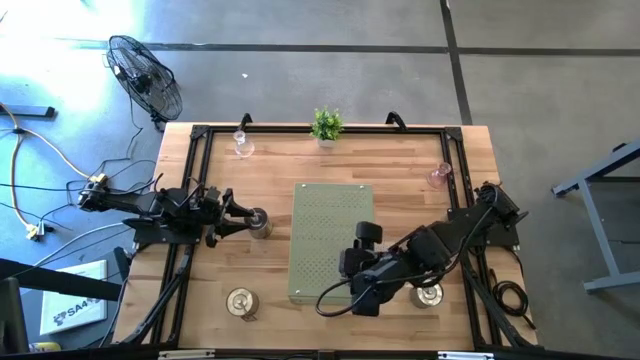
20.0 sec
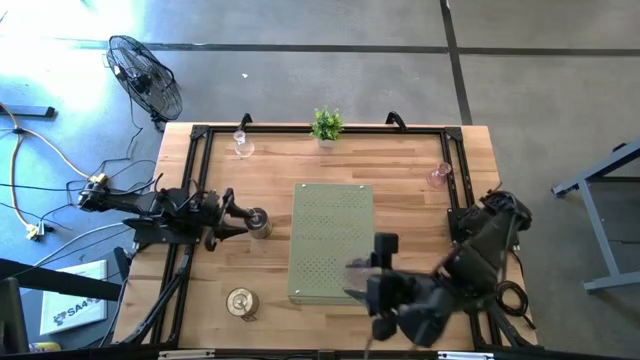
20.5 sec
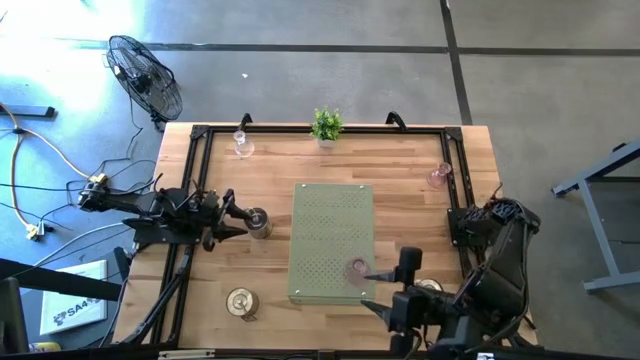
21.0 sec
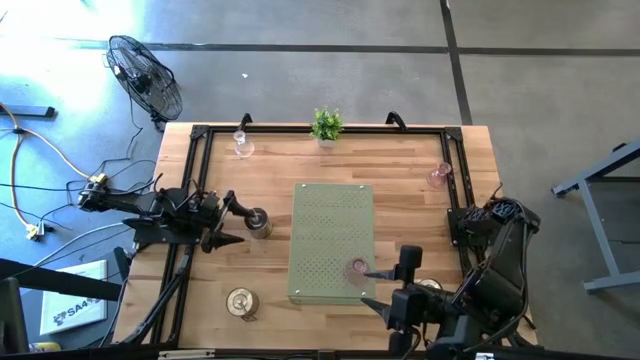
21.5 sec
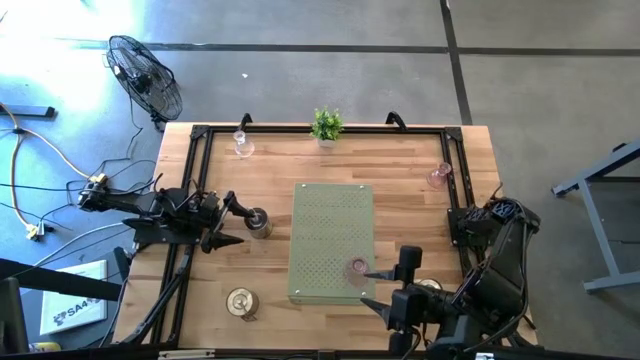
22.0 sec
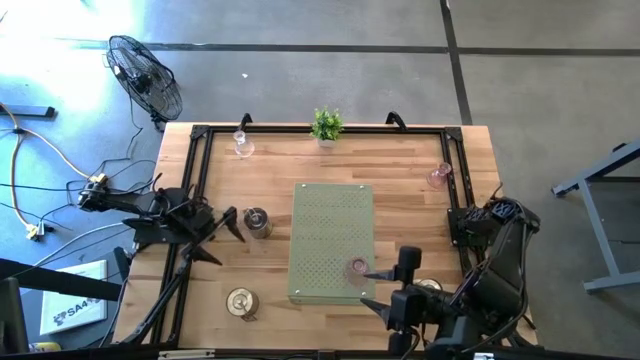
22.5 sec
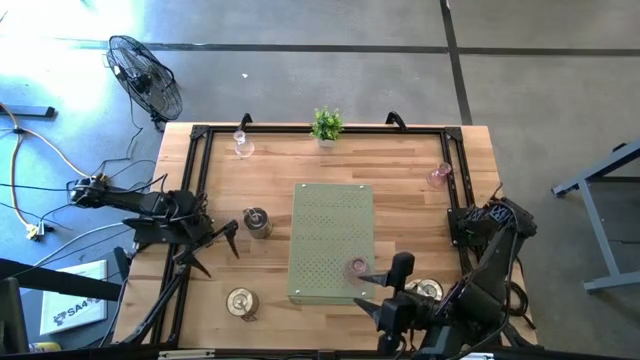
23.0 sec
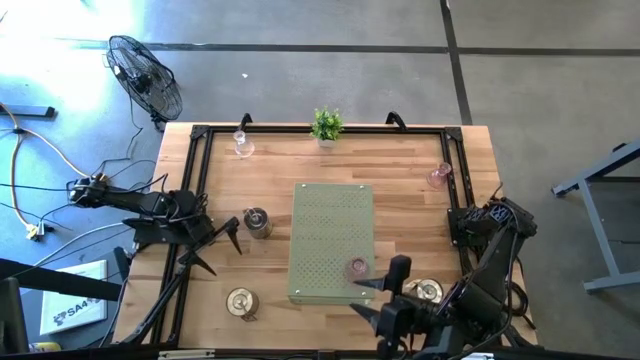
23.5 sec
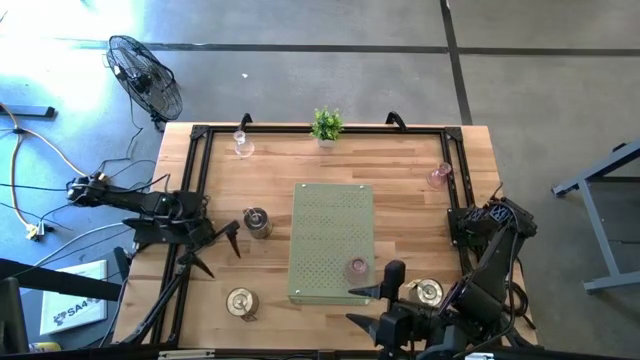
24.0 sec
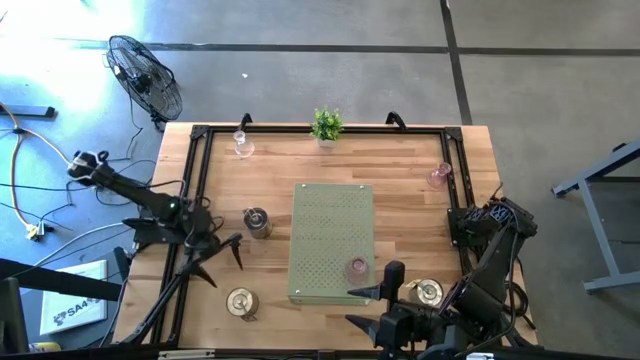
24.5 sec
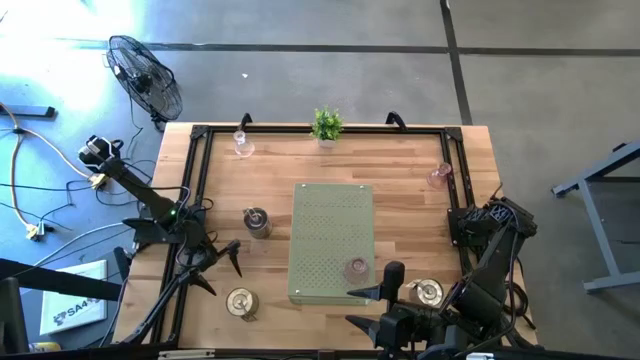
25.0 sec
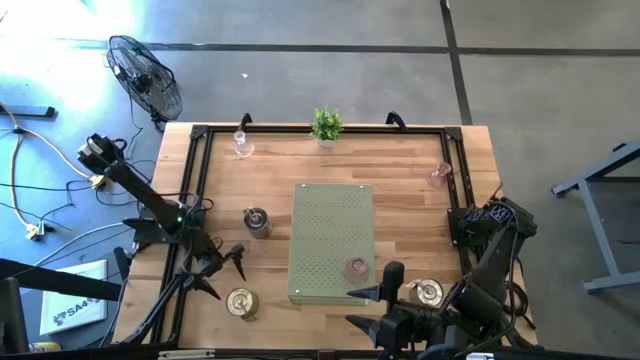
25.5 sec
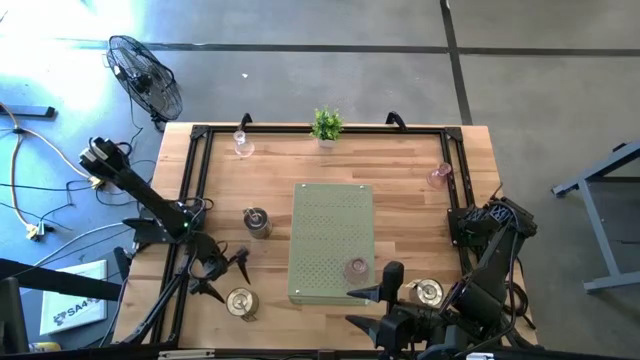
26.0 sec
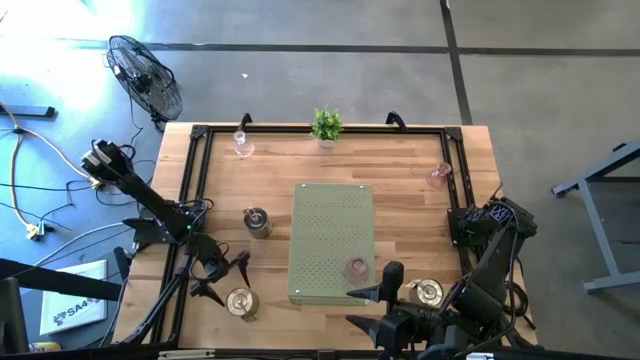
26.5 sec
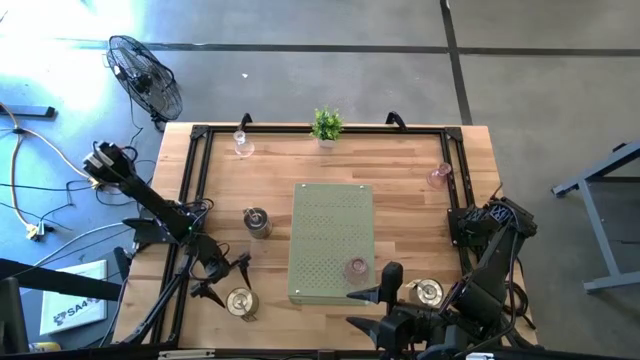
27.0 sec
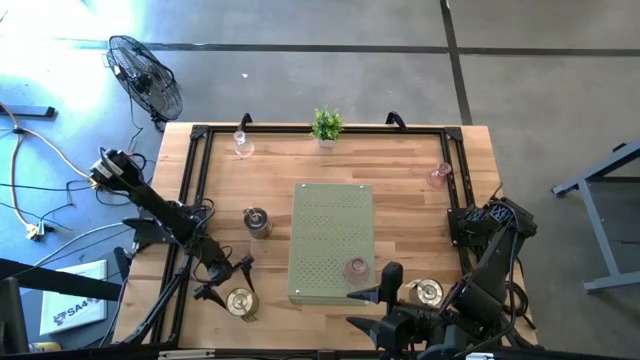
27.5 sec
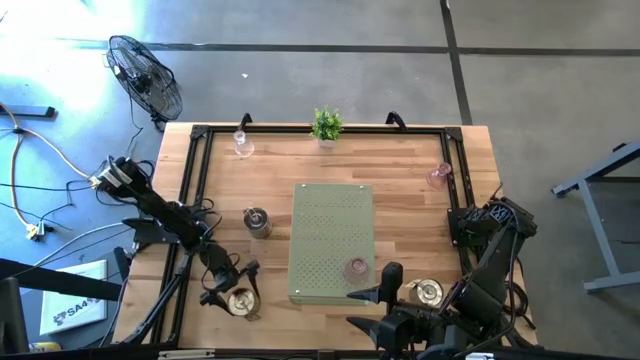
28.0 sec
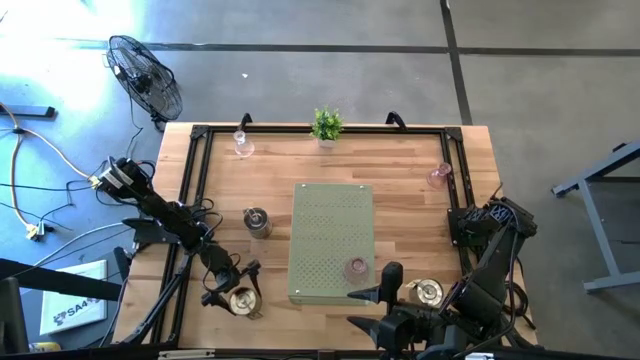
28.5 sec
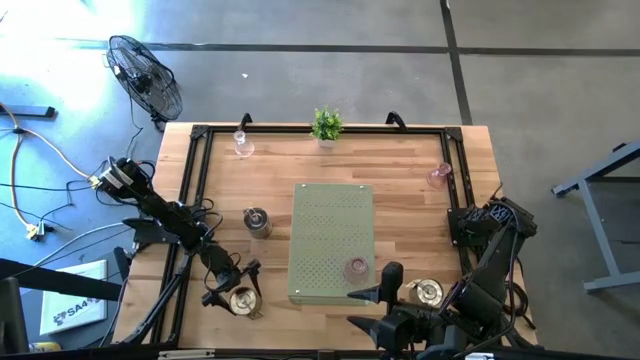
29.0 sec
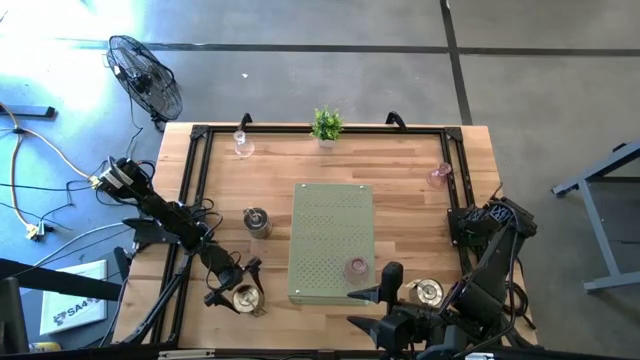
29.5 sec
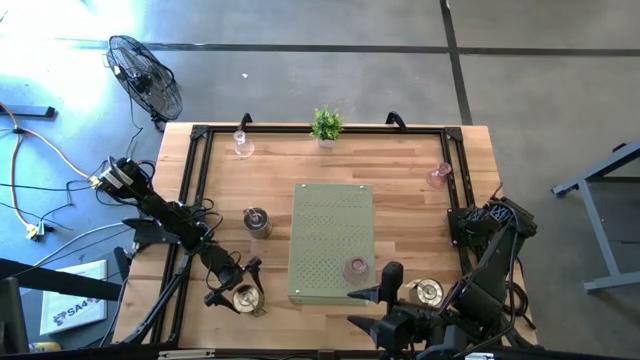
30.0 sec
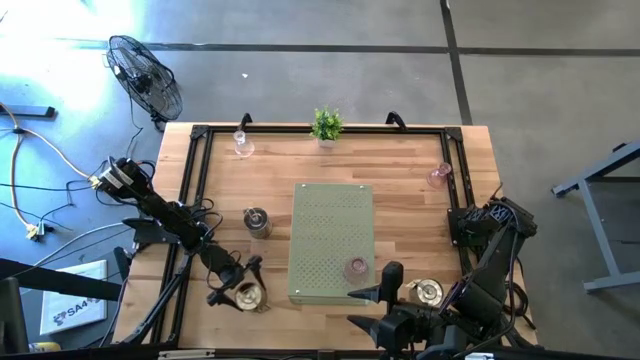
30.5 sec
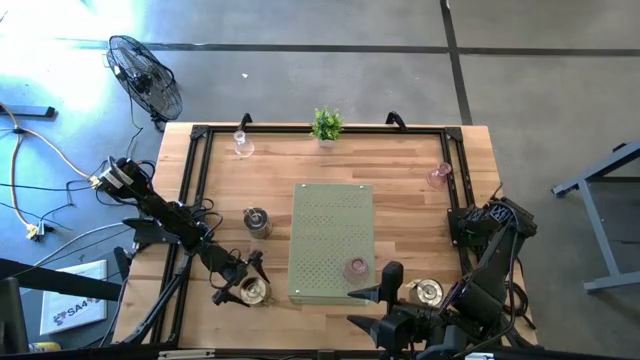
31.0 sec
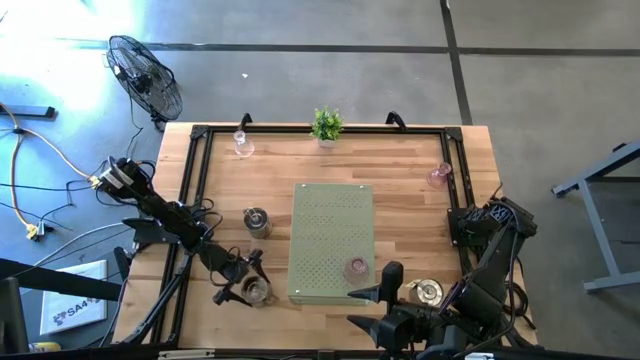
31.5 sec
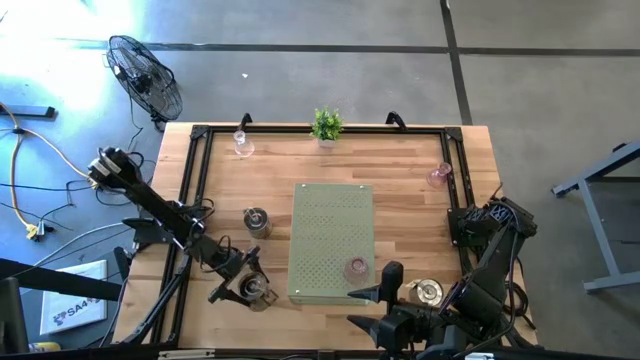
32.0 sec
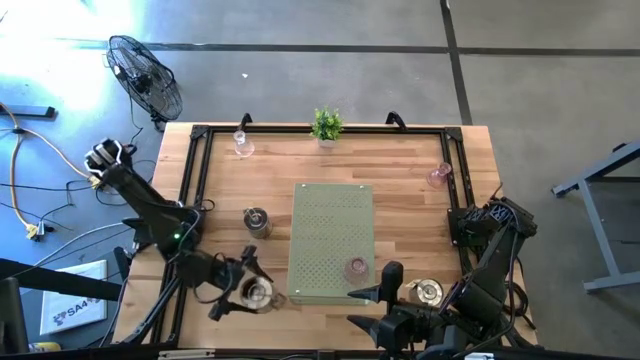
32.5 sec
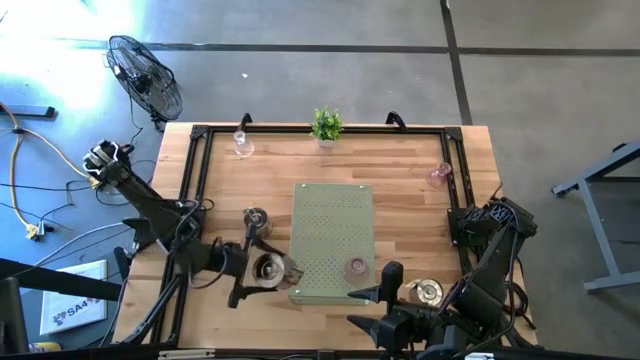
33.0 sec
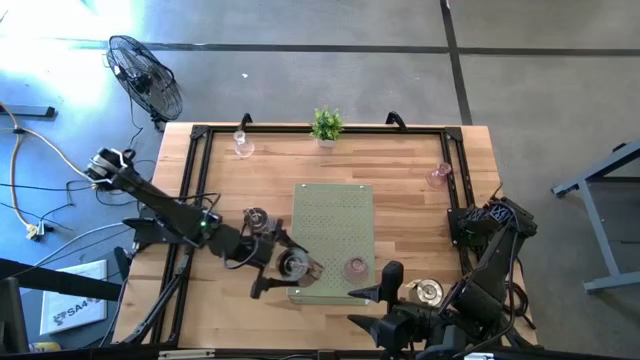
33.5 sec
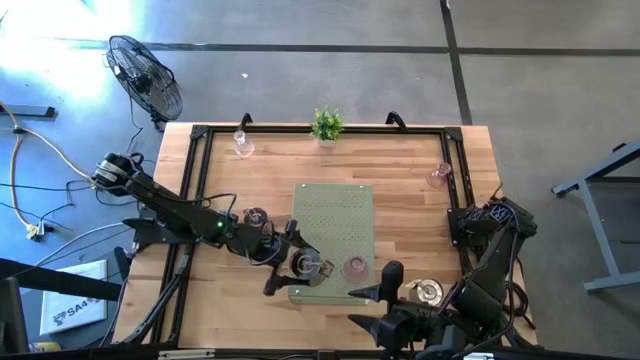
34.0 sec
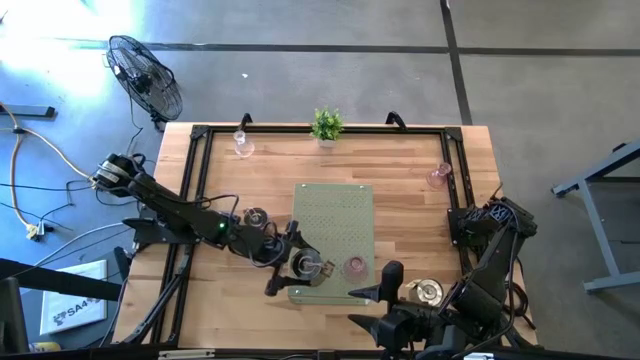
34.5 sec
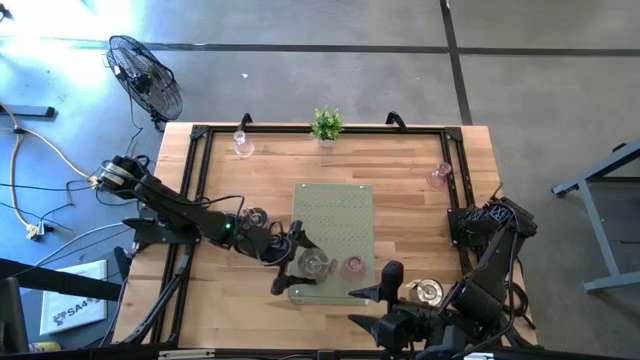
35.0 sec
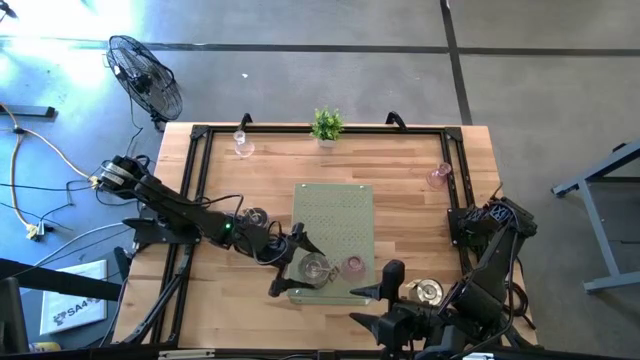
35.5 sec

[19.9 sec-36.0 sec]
Task: Pick & Place candle stick holders
Put the pink scented candle on the shelf aligned with the purple candle holder
